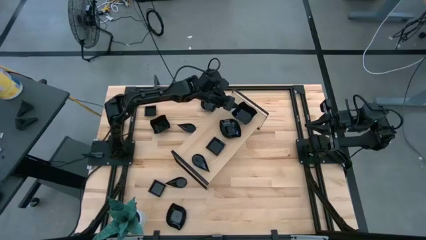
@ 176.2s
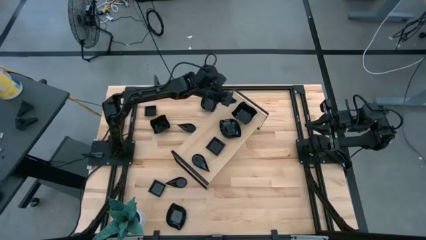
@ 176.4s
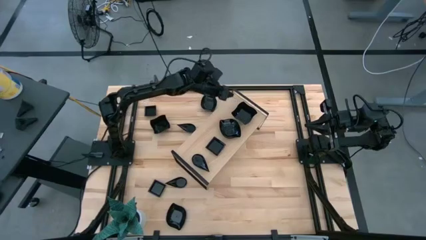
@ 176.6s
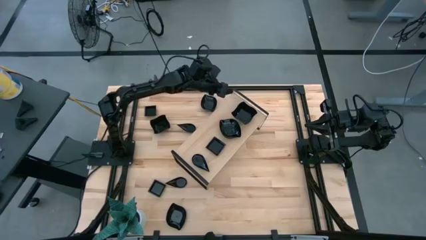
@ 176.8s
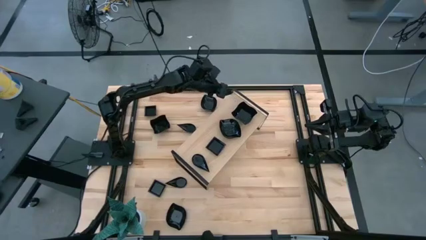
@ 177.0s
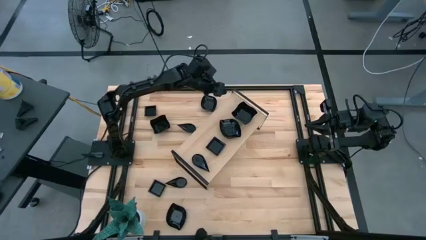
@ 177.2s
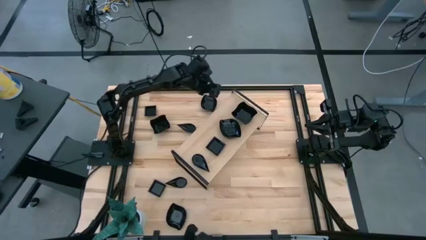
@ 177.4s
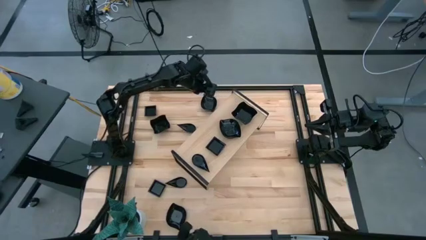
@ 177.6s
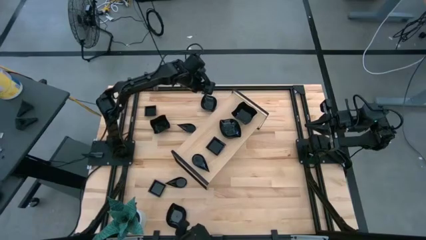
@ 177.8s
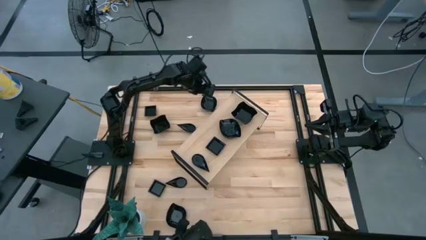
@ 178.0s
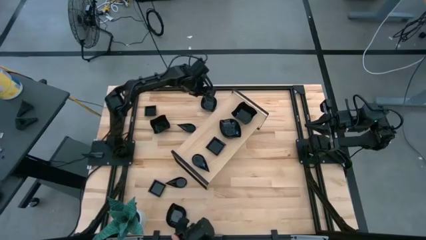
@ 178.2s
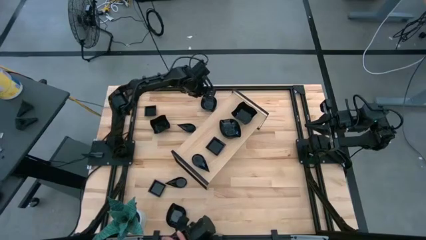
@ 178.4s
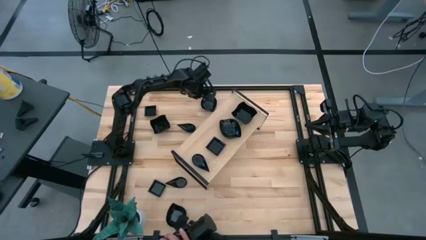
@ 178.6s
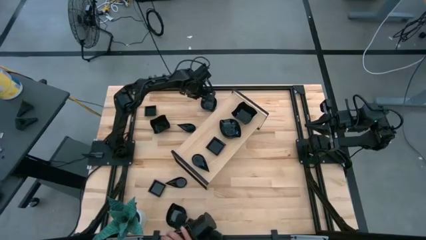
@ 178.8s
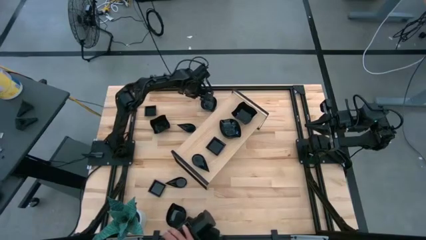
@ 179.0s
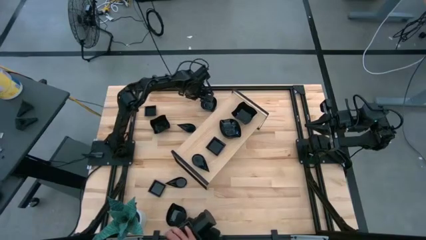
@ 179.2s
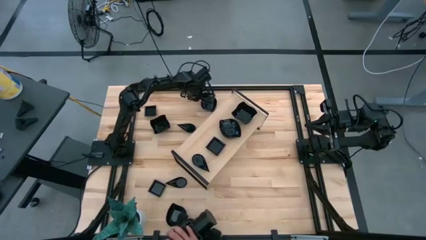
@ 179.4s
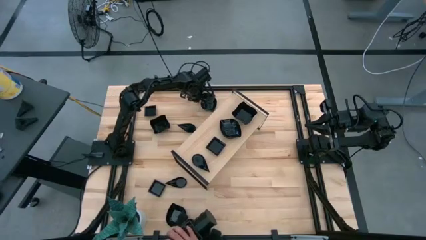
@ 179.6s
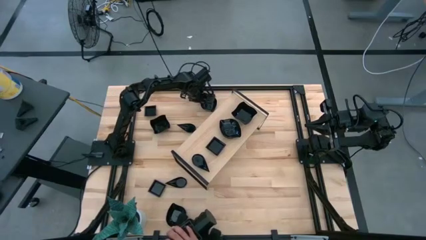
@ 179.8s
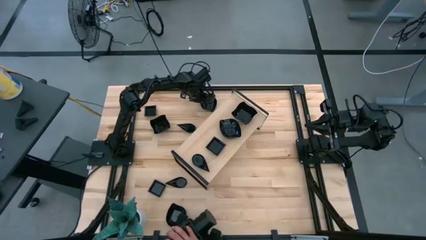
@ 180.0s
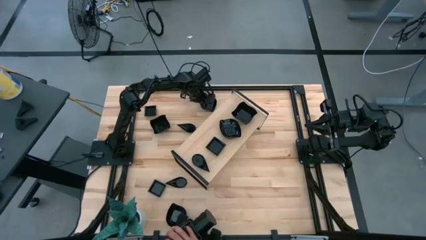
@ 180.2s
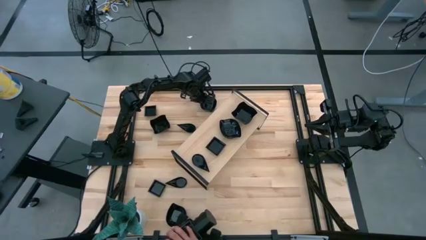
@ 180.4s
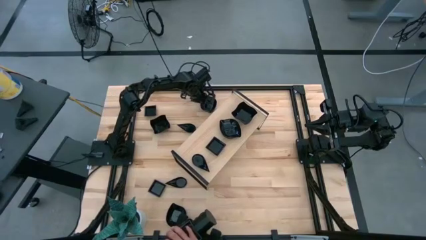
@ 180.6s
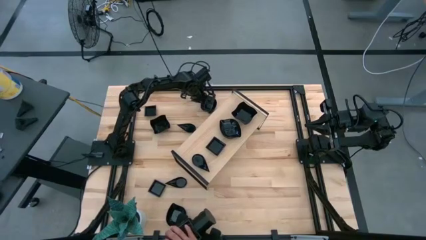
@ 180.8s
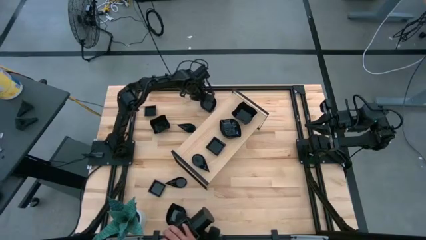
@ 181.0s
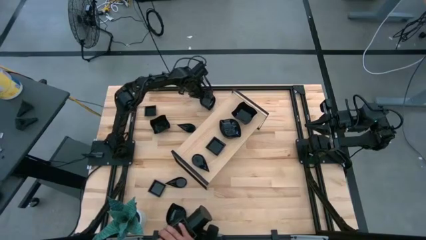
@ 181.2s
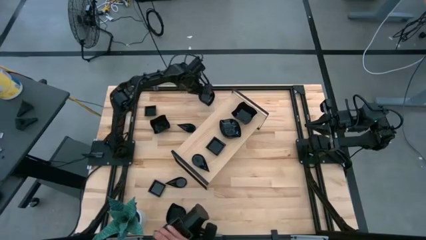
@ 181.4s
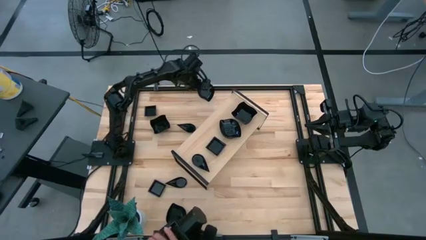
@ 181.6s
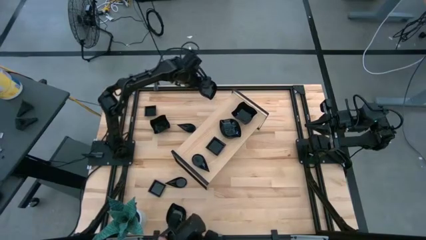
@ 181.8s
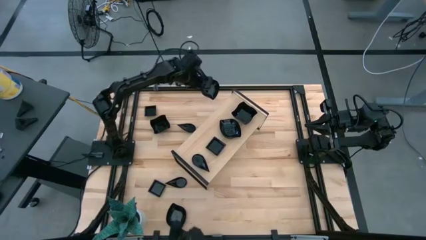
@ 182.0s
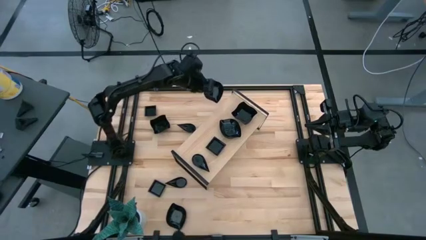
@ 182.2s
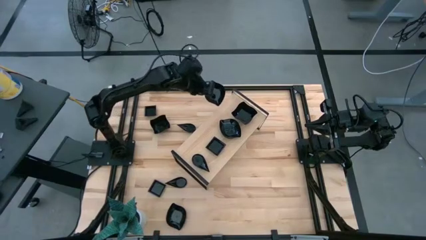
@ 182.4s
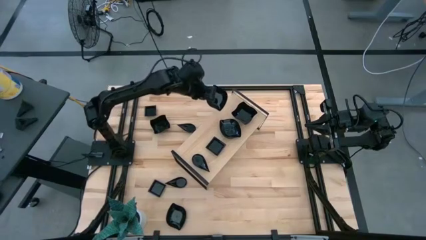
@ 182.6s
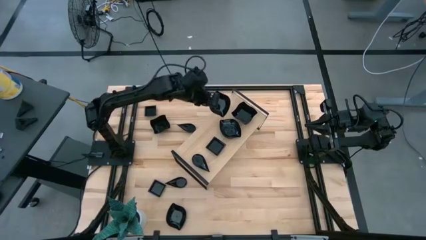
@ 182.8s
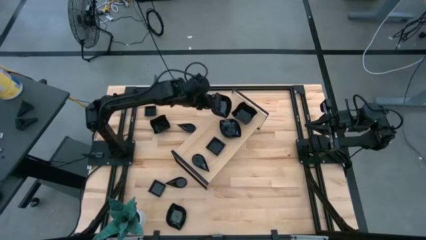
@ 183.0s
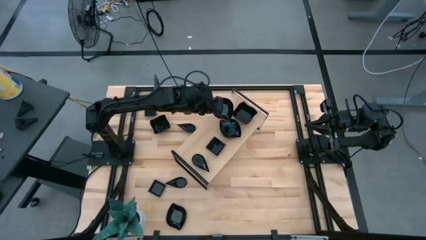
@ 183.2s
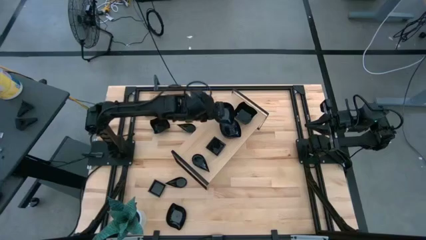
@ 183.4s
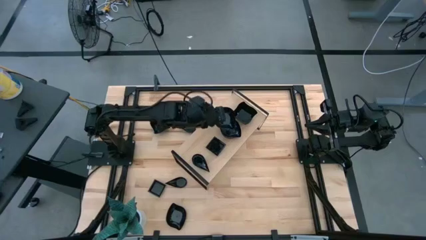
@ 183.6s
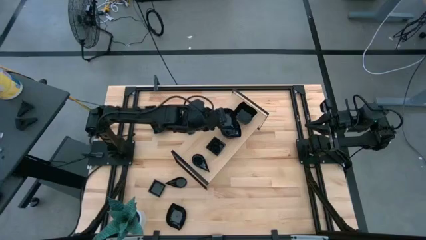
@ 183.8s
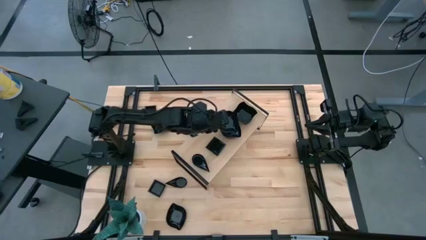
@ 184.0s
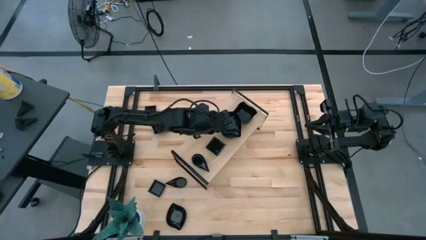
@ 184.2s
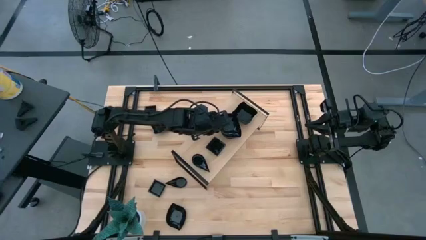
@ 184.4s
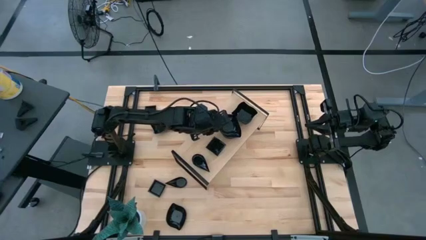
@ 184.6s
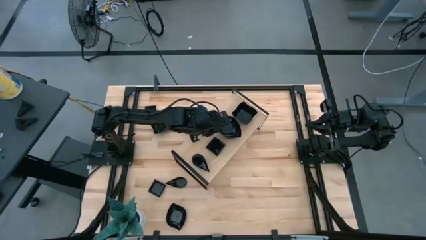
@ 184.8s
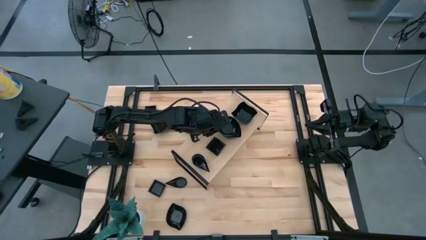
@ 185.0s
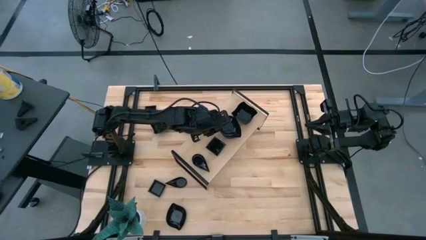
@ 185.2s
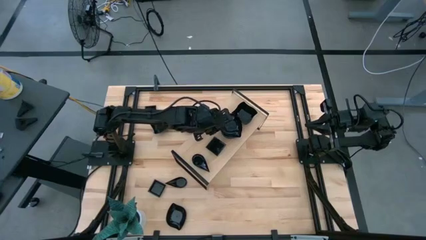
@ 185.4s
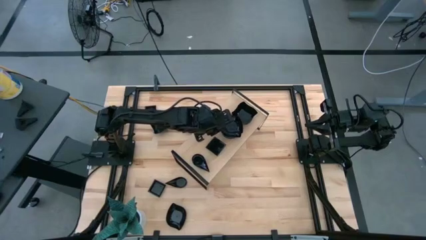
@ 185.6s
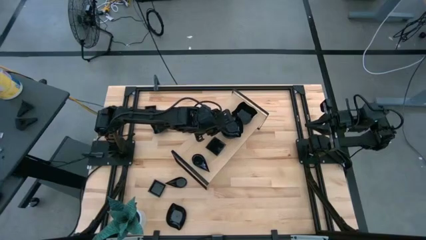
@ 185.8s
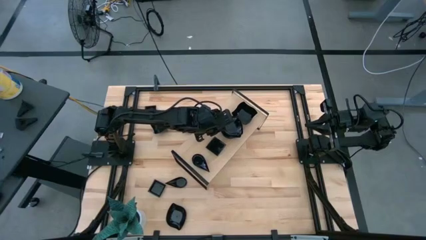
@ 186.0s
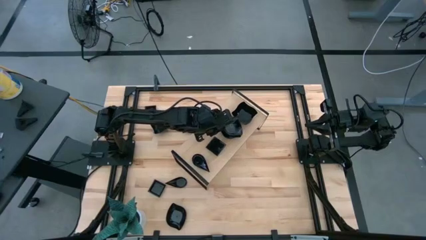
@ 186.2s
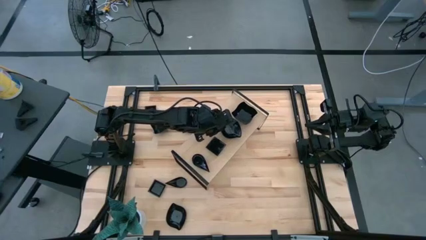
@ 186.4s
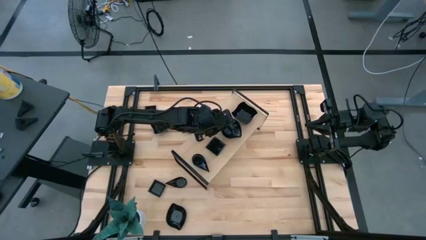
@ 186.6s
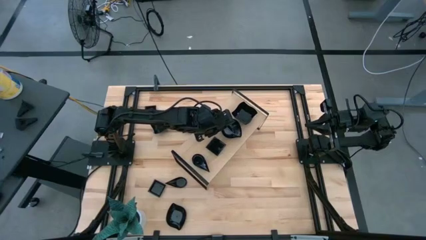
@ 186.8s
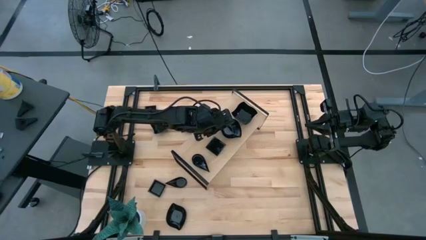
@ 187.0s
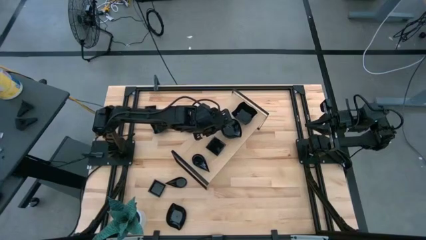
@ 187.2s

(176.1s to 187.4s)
Task: Pick & Place Mini shaped plates
Stack the black leaf shaped bowl on top of the black leaf shaped bowl on the shelf

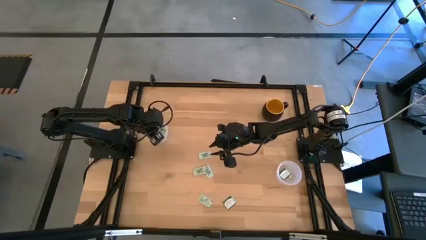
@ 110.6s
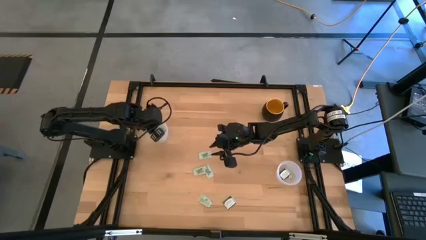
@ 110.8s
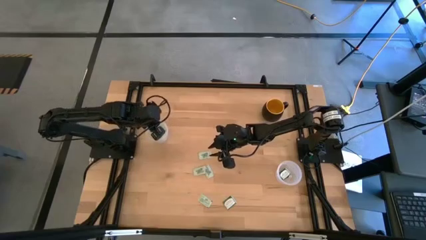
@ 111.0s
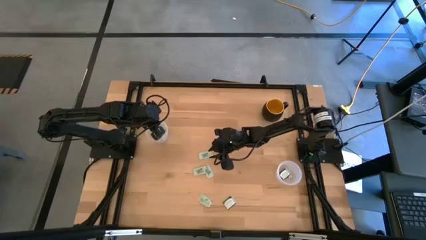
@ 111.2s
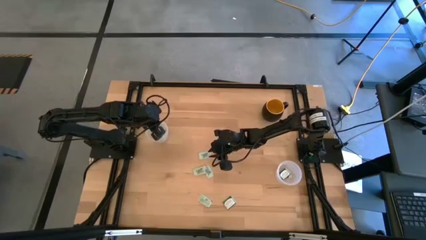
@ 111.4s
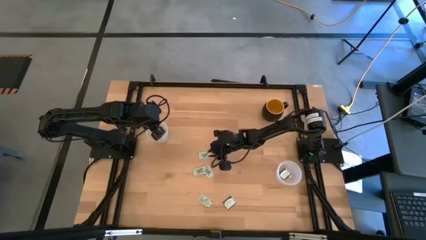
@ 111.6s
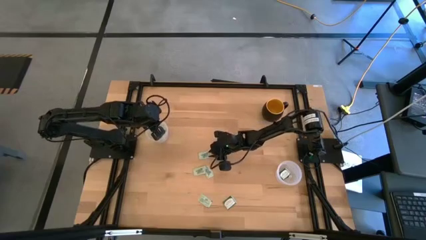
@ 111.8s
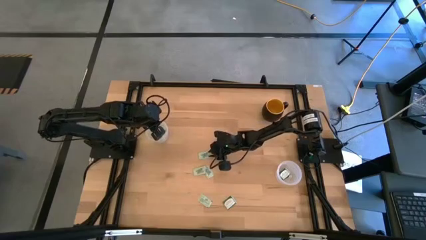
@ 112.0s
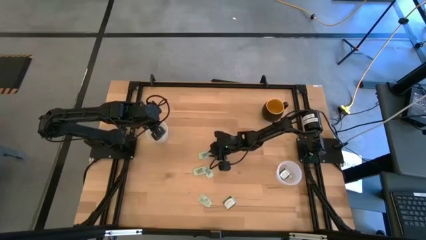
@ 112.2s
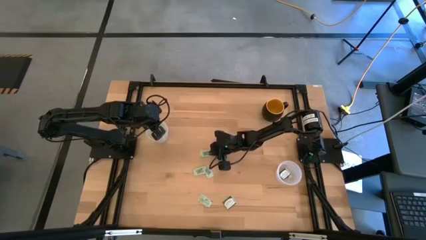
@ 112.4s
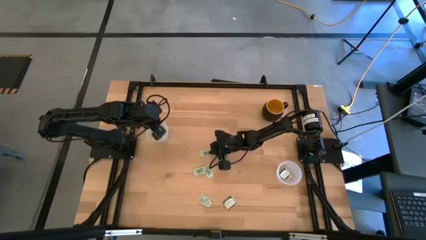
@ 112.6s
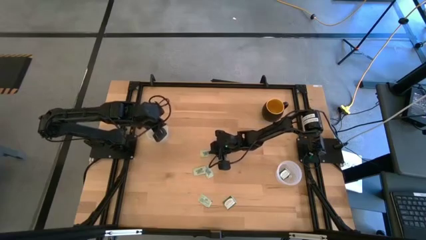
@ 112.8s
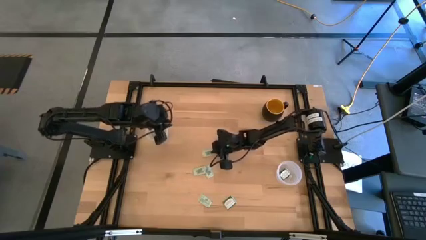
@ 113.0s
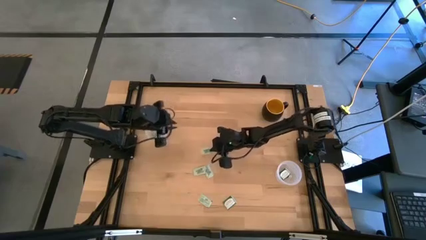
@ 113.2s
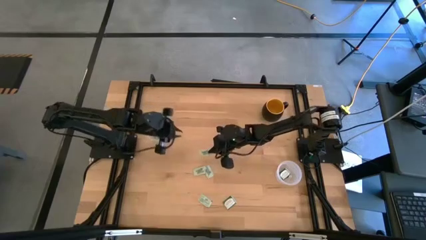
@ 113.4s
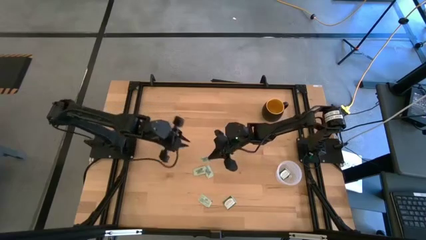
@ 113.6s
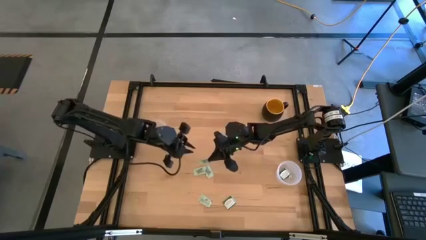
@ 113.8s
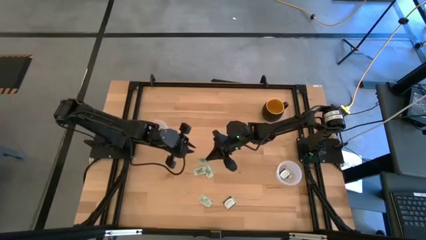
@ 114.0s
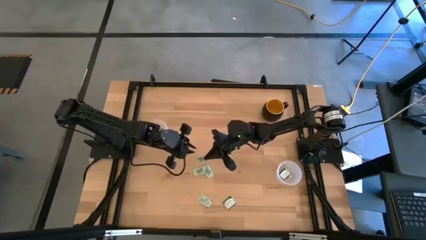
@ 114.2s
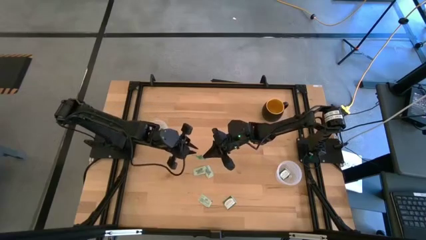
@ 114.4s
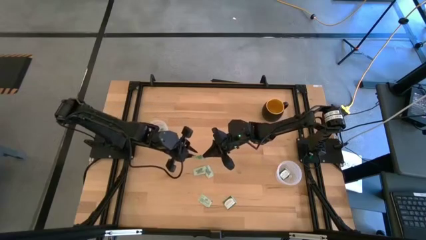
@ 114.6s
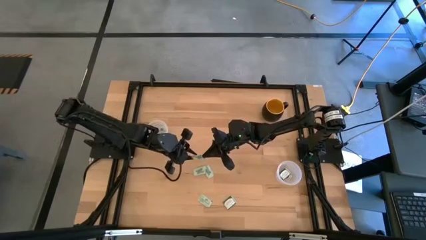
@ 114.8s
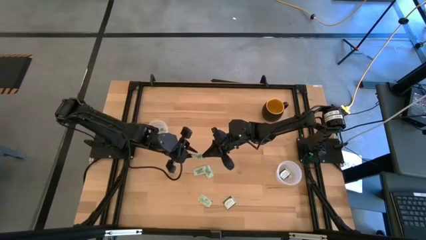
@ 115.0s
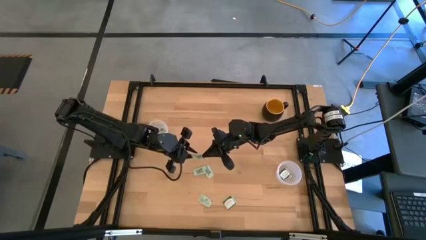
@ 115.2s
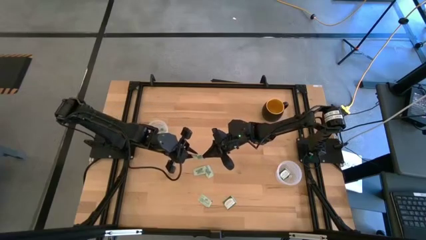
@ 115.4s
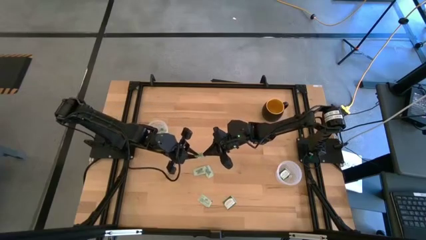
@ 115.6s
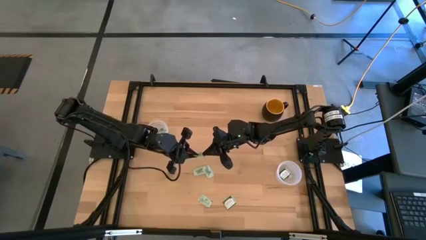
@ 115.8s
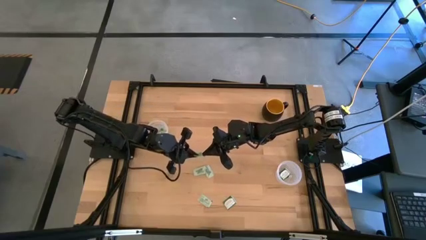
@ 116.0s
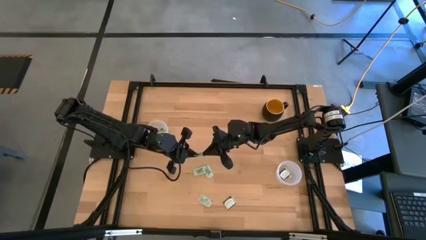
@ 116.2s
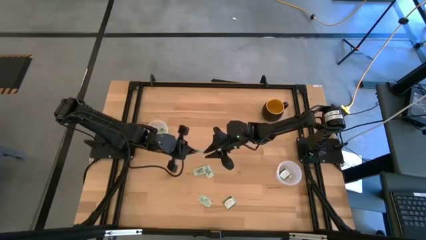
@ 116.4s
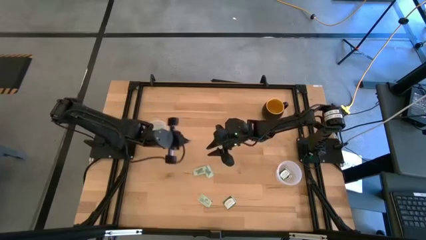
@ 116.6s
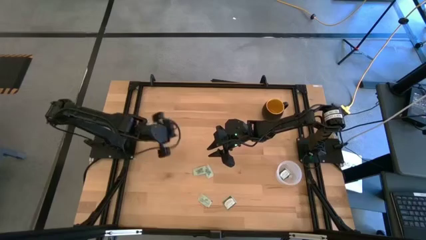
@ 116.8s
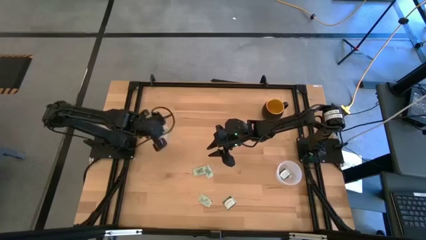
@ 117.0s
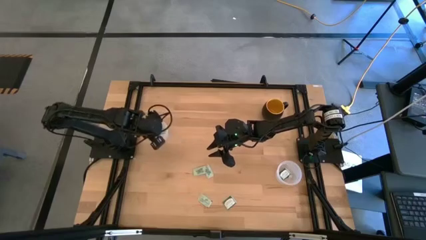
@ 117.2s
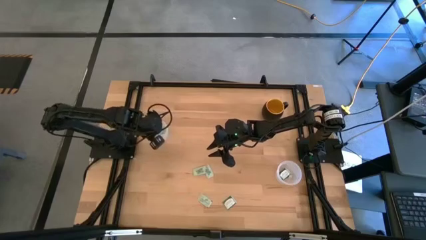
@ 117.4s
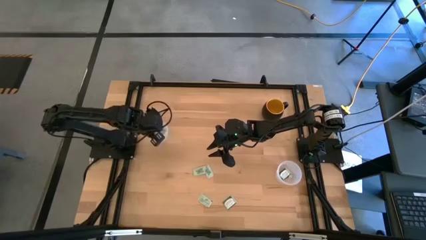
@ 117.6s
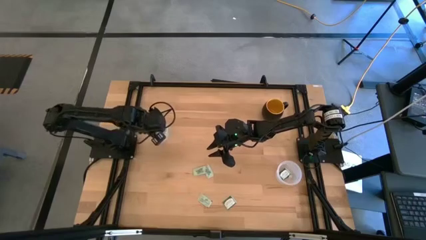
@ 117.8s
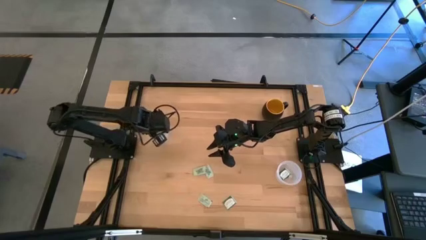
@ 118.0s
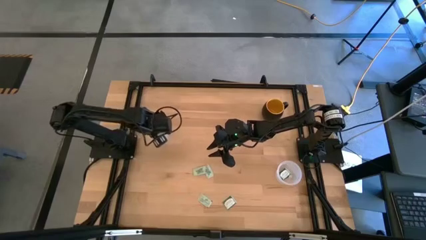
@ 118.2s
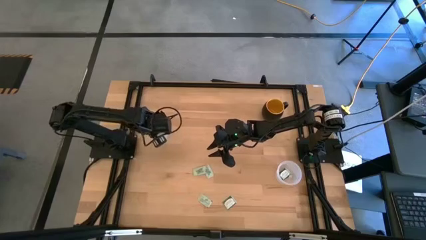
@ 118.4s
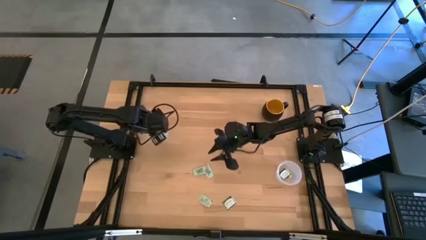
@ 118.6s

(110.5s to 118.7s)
Task: Pick and place Stevia / Truvia into bins
Put the white stevia packet into the left transparent container
